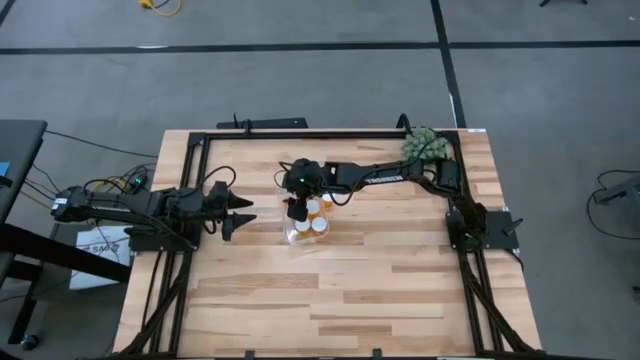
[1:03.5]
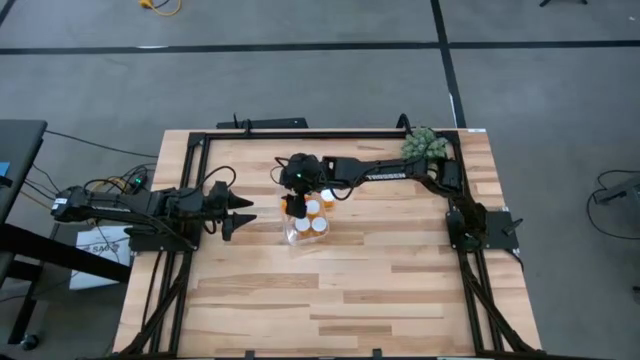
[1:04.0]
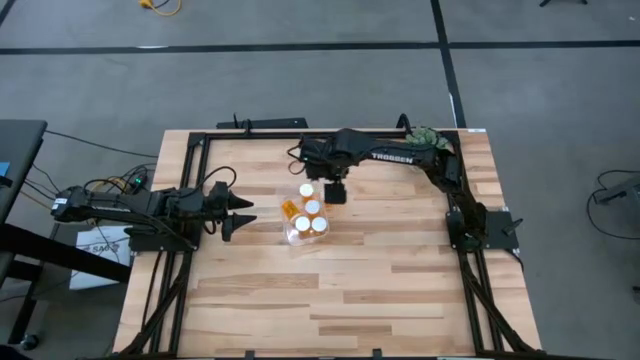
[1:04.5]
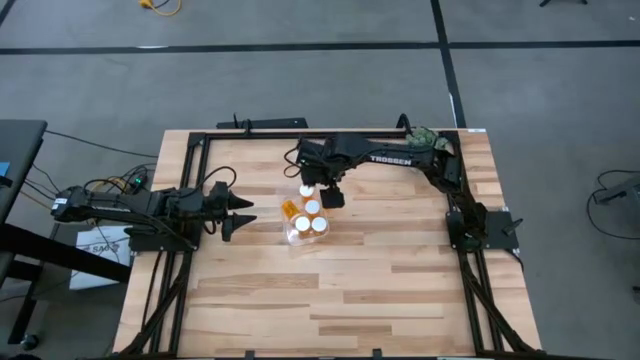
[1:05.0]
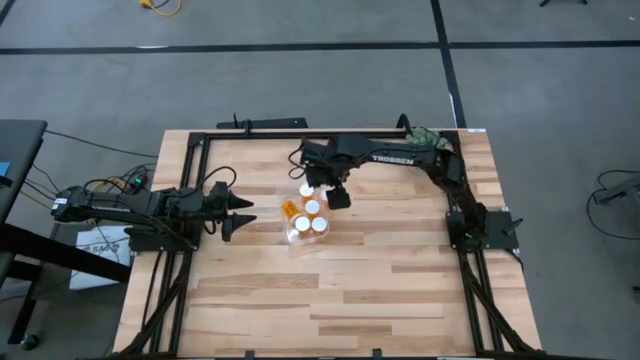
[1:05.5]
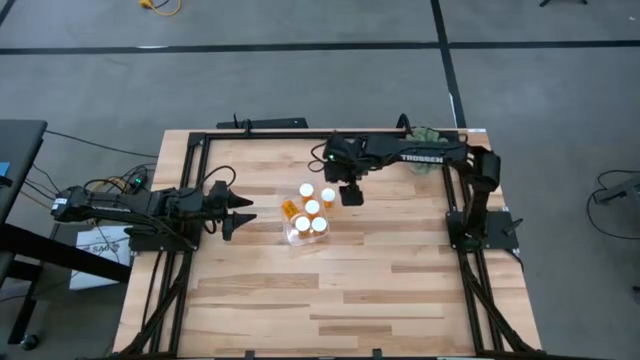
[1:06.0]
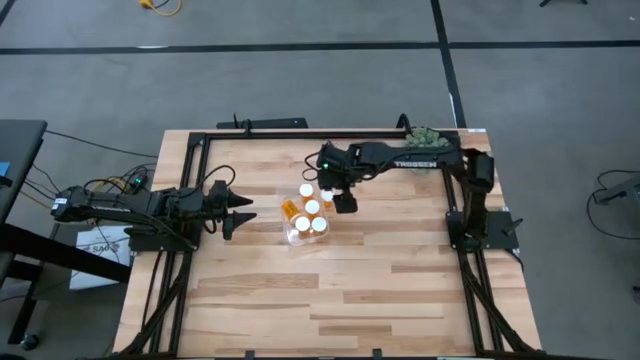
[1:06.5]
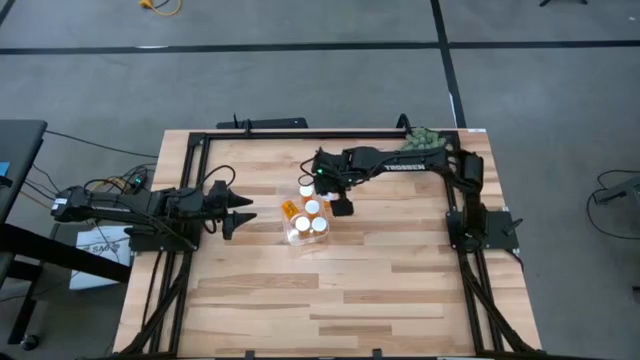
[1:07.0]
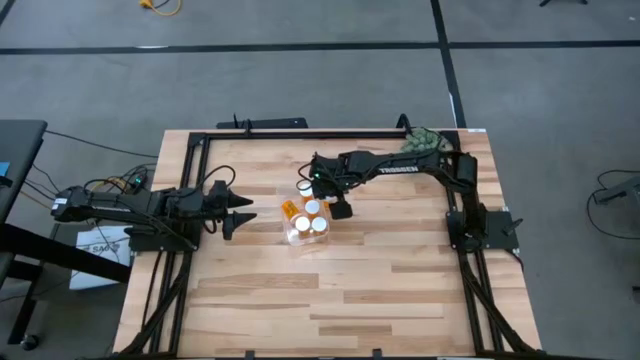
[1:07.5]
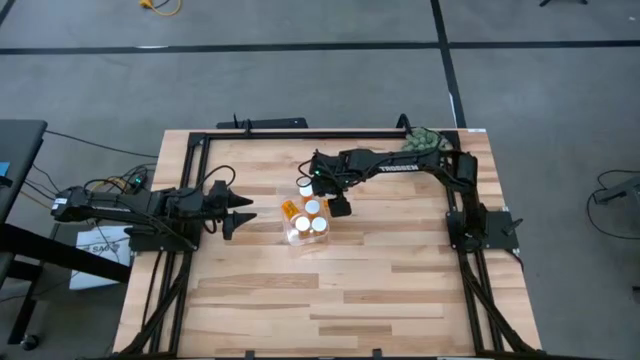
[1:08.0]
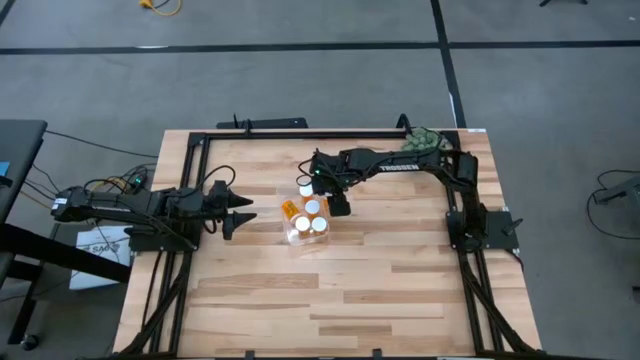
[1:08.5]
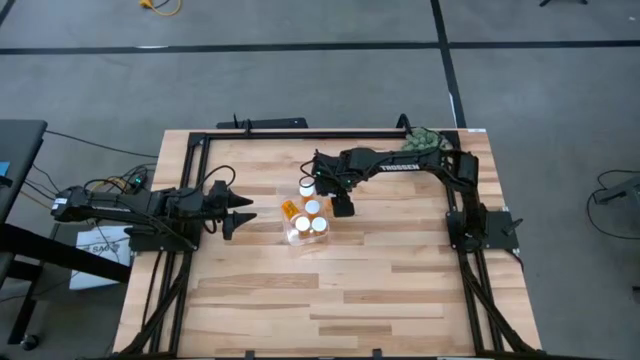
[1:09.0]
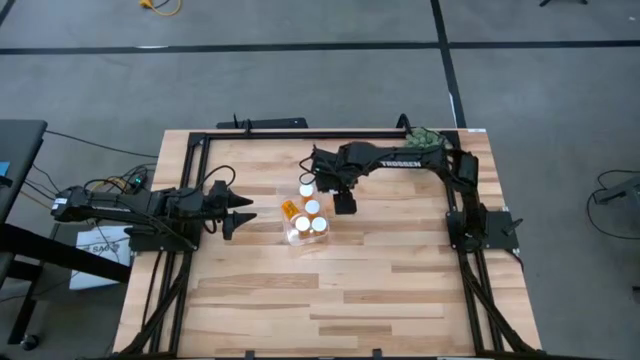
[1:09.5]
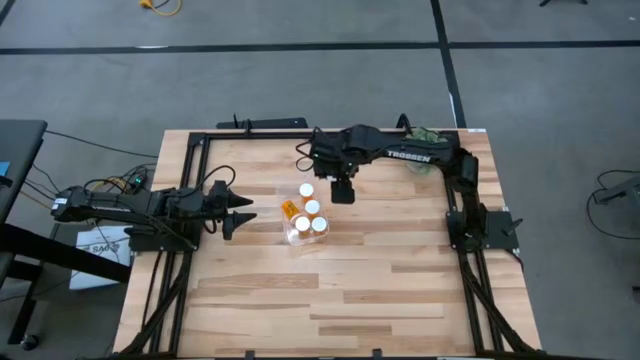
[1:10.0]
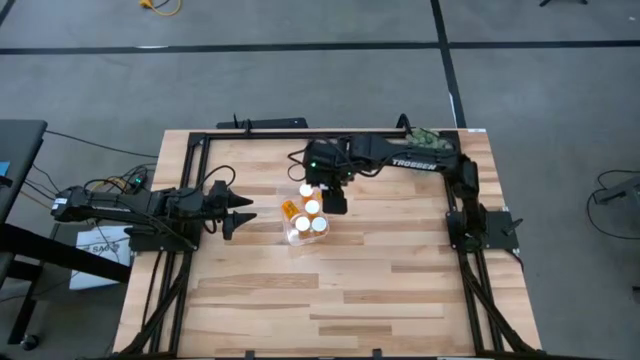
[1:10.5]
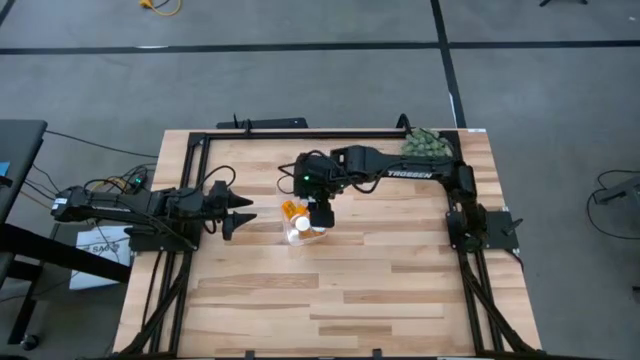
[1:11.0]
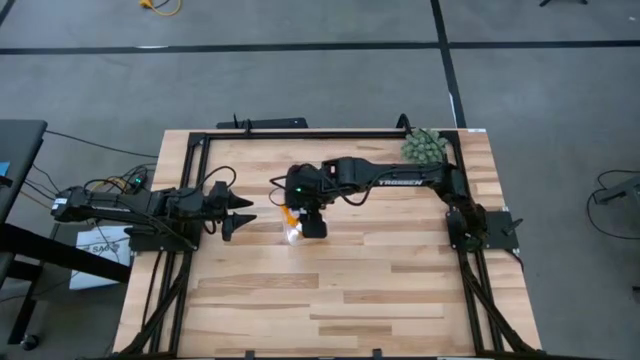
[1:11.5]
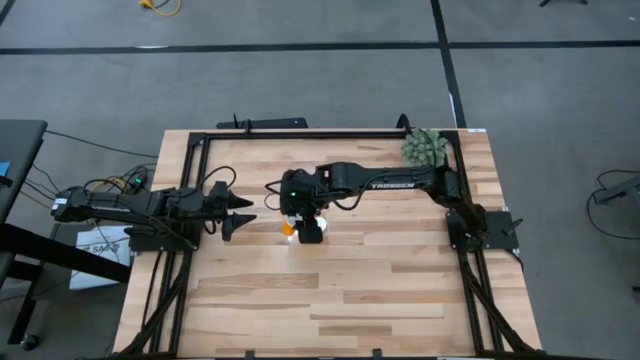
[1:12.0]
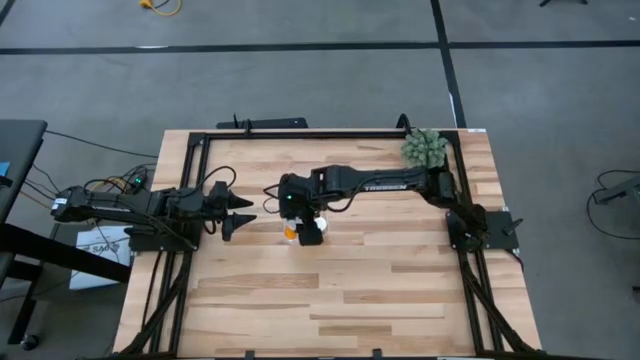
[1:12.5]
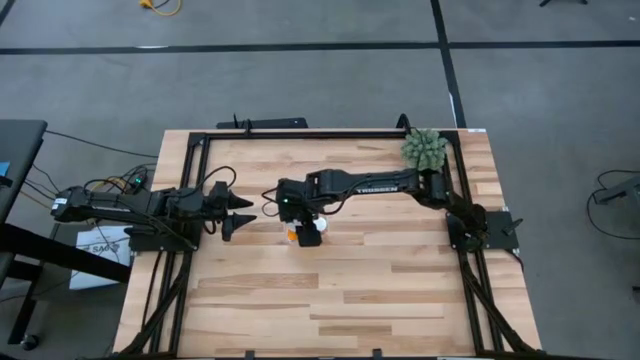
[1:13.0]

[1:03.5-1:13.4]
Task: Pick and place pill bottles into a basket
Put the orange pill bottle into the transparent container

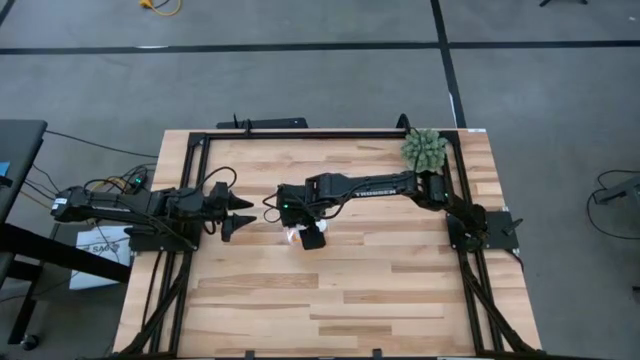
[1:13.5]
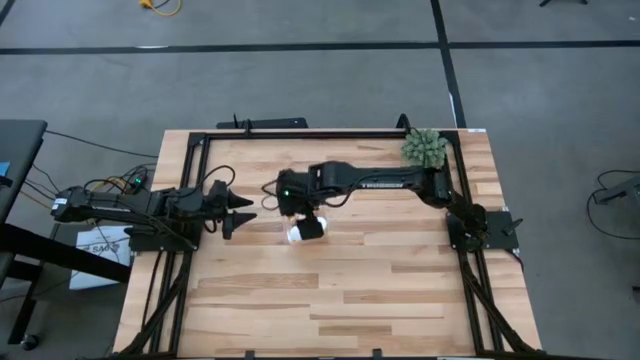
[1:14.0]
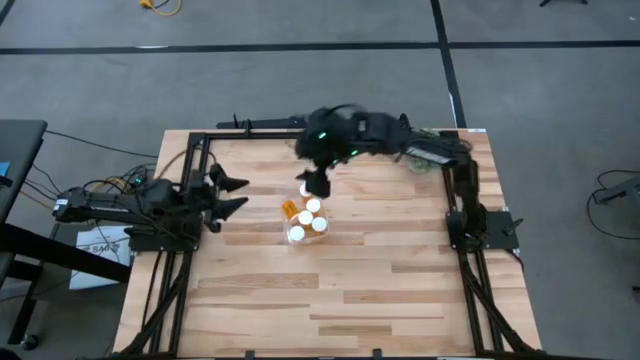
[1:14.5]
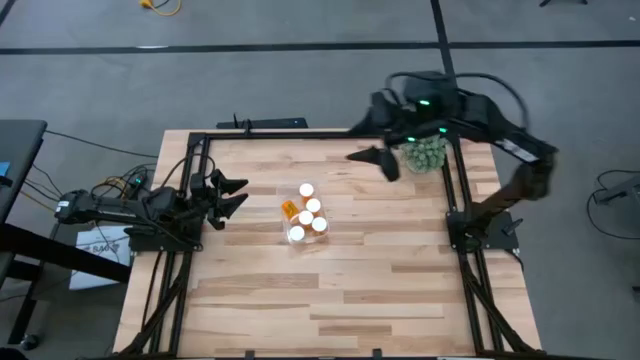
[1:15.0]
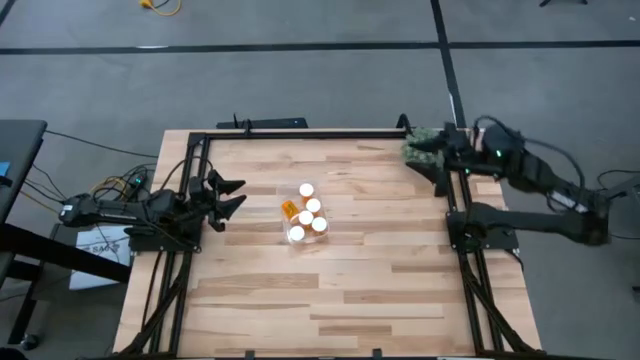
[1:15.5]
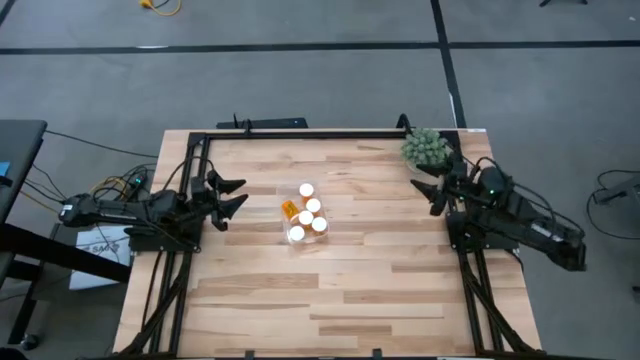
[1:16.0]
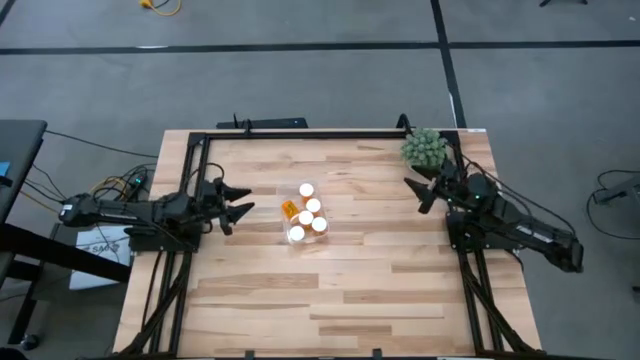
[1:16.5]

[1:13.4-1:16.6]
Return to Home Position

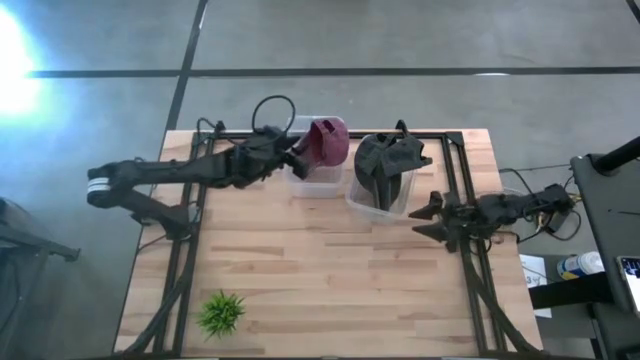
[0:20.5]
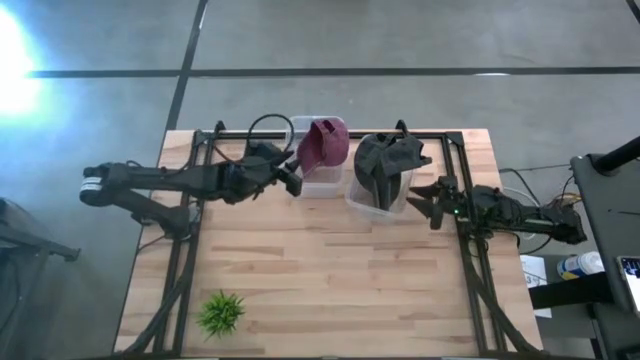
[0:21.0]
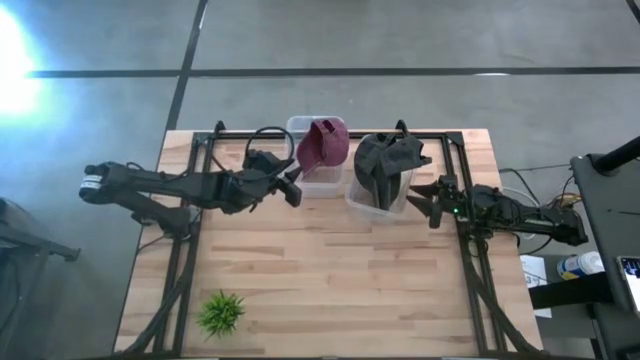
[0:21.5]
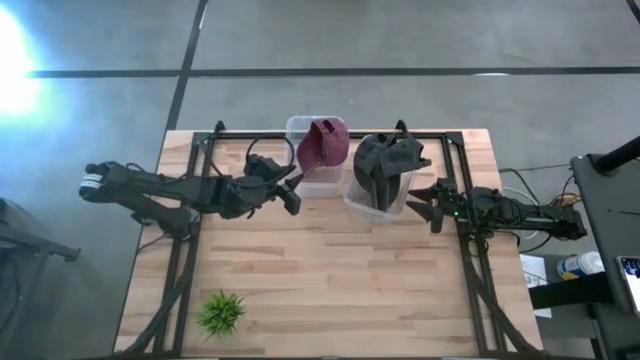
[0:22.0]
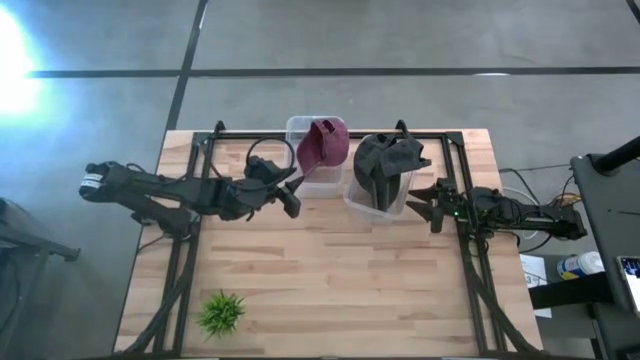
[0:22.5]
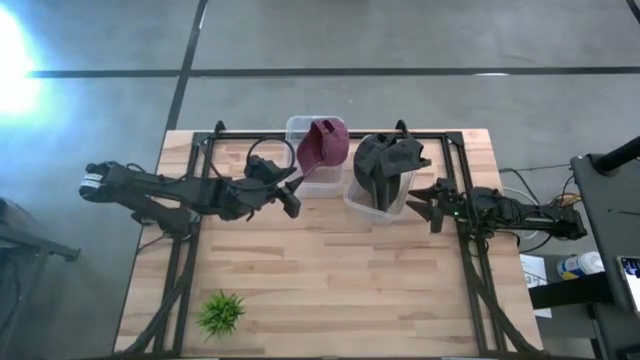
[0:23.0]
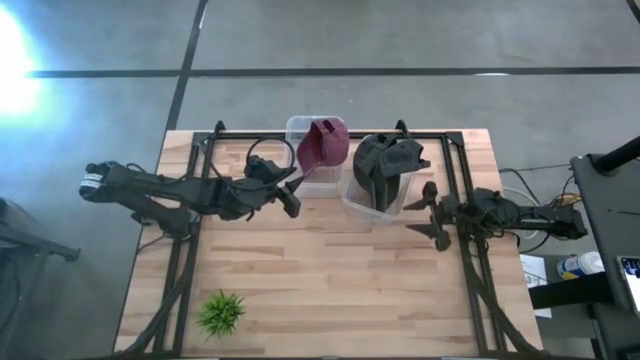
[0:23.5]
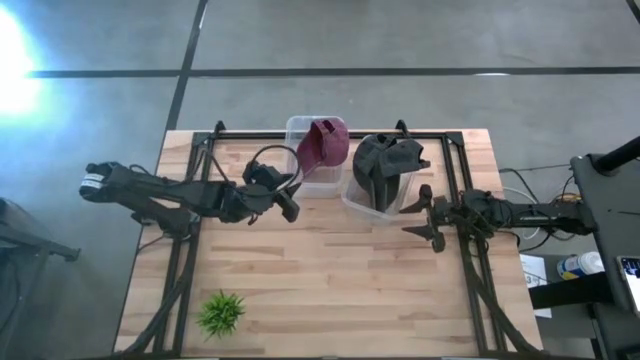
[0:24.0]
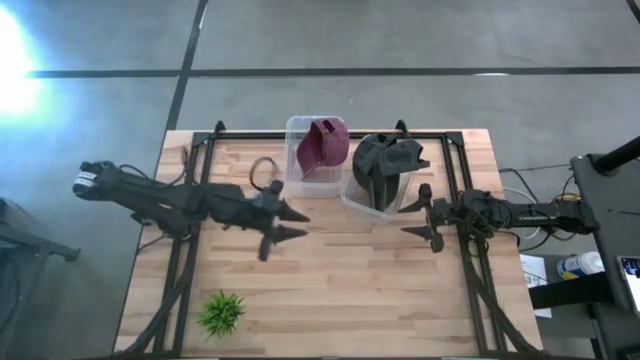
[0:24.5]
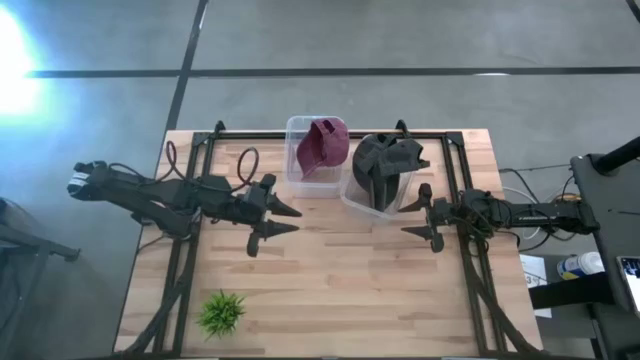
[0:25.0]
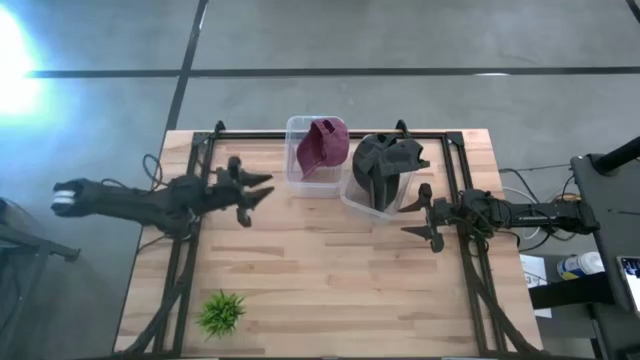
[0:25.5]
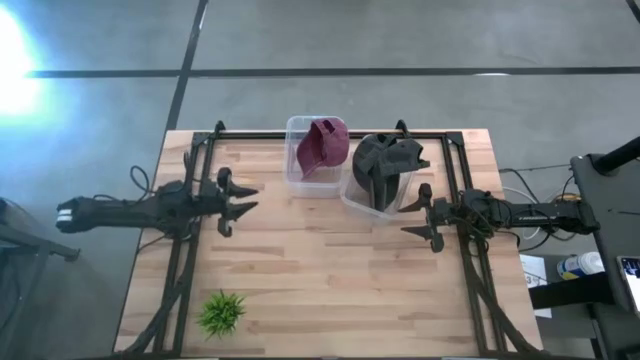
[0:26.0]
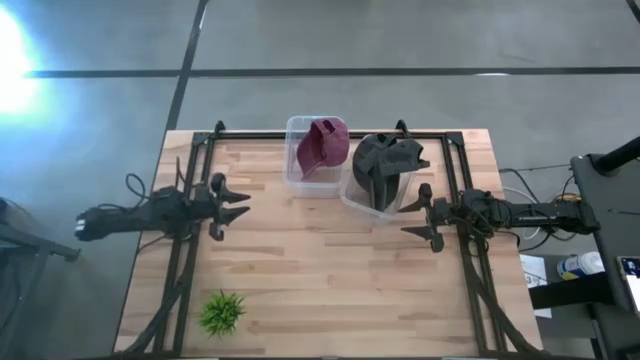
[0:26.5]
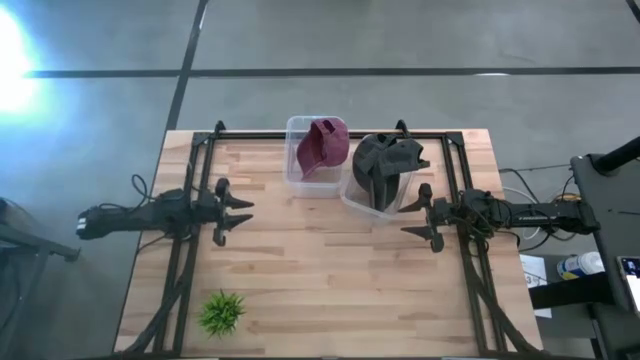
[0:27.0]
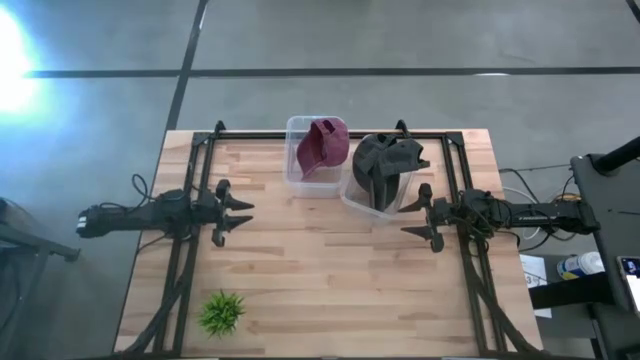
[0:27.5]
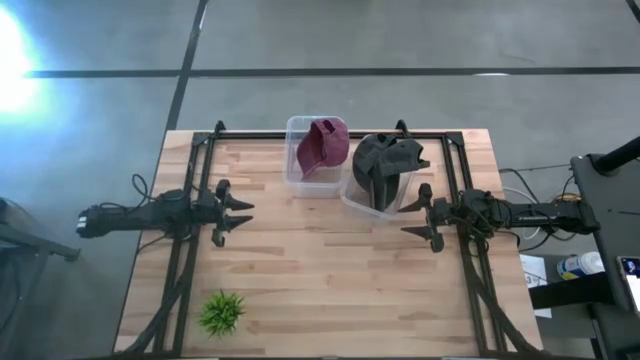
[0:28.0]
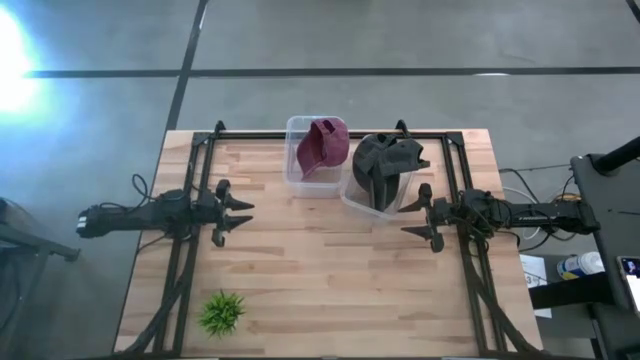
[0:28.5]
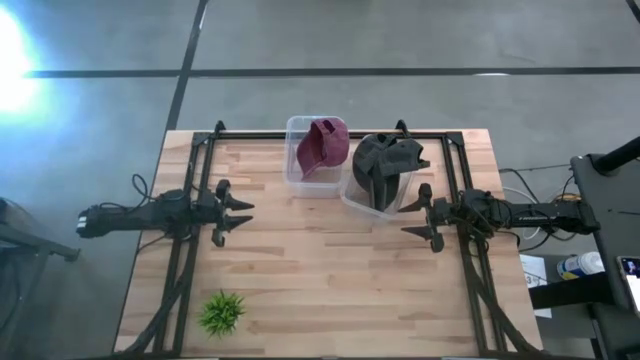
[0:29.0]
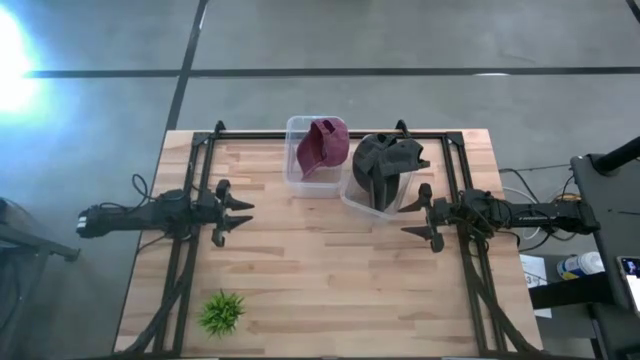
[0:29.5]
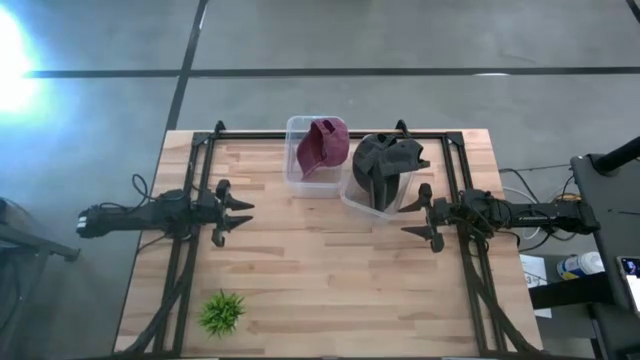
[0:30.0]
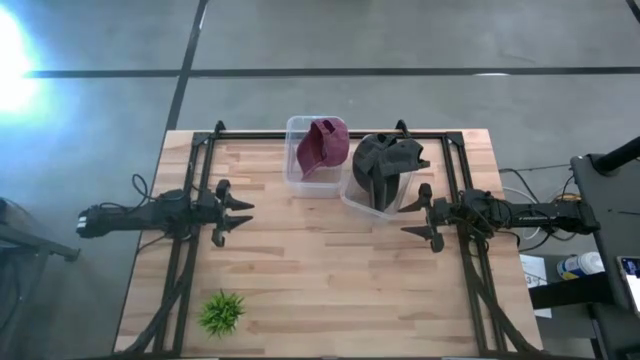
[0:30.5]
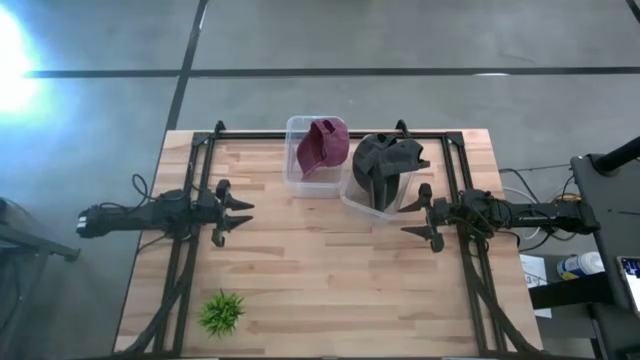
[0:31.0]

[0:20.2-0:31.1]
Task: Pick & Place hat
Return to Home Position
